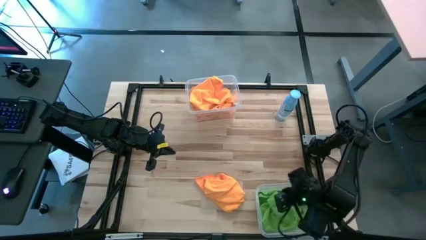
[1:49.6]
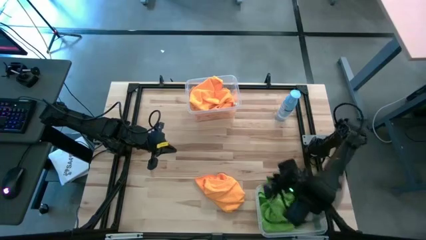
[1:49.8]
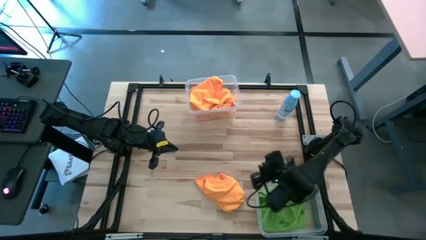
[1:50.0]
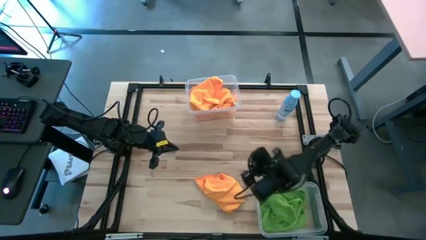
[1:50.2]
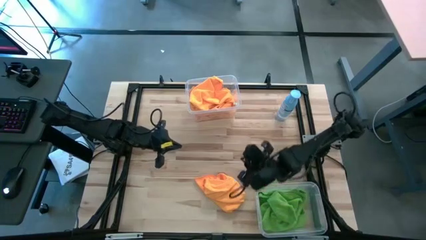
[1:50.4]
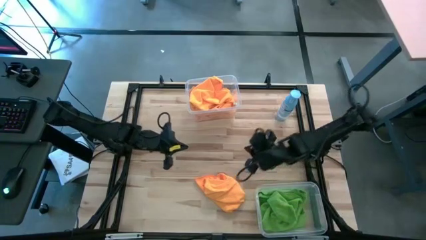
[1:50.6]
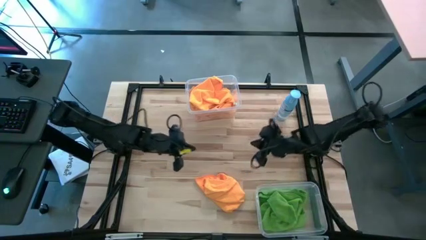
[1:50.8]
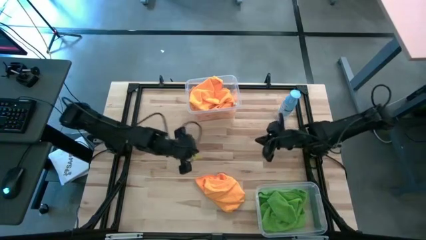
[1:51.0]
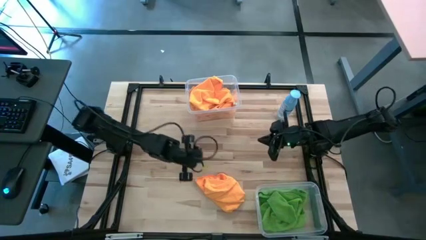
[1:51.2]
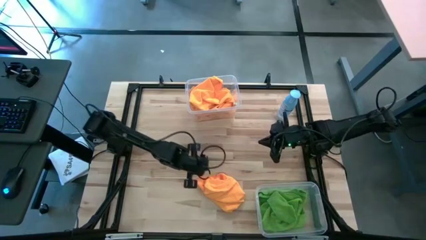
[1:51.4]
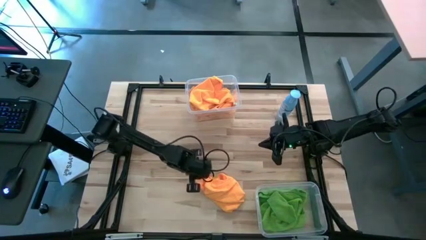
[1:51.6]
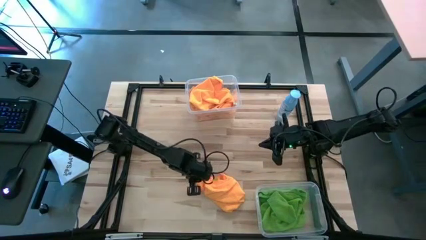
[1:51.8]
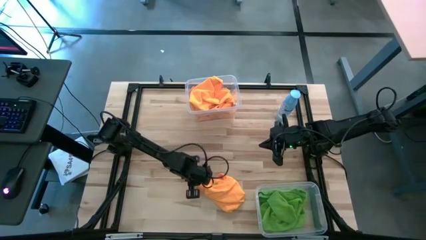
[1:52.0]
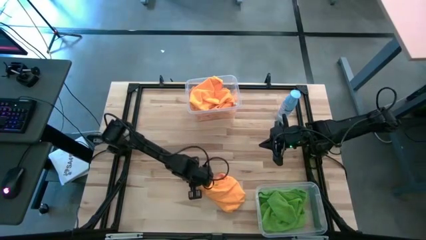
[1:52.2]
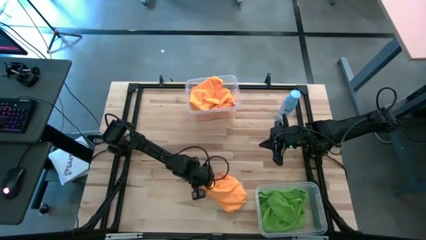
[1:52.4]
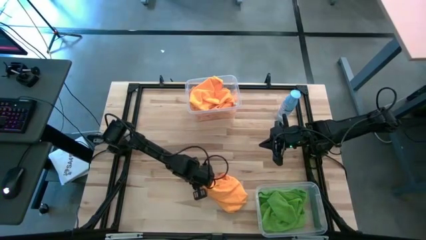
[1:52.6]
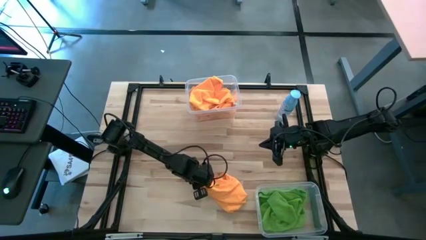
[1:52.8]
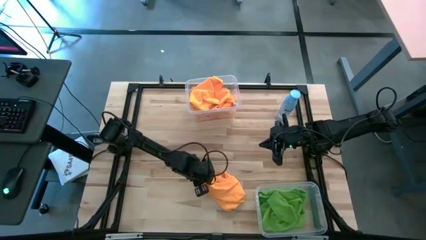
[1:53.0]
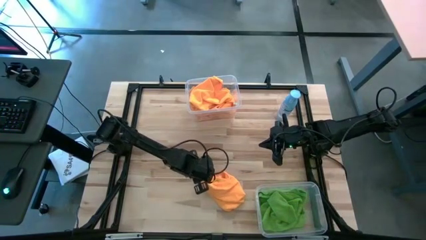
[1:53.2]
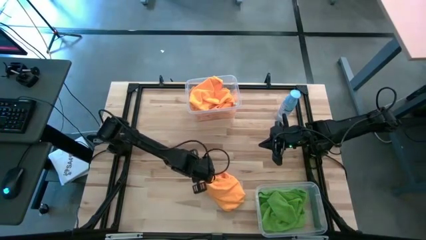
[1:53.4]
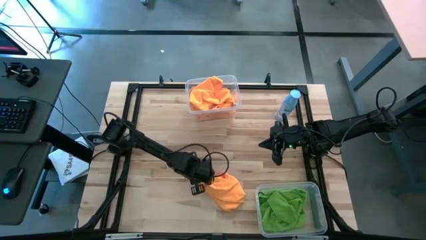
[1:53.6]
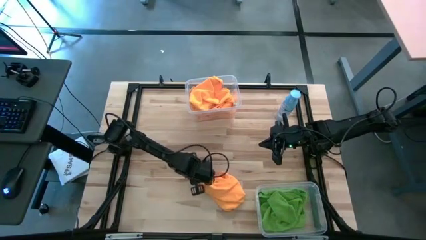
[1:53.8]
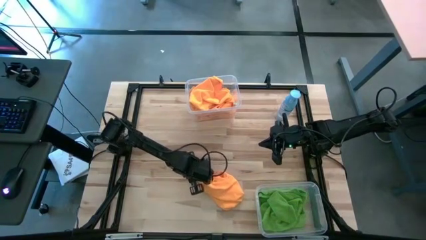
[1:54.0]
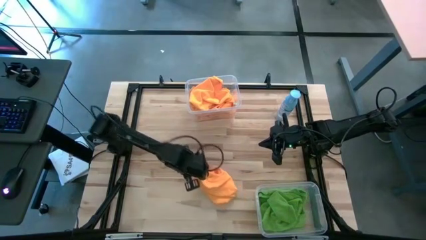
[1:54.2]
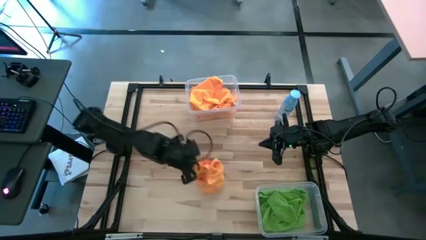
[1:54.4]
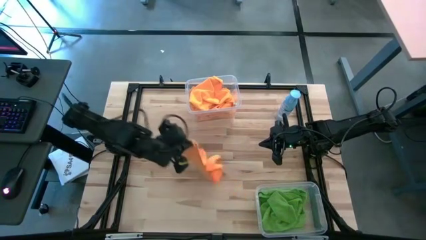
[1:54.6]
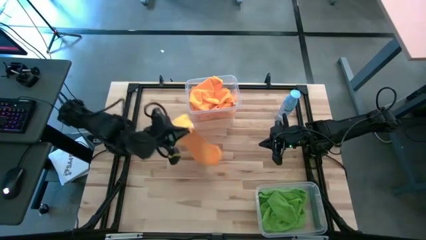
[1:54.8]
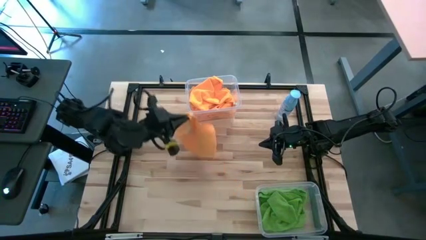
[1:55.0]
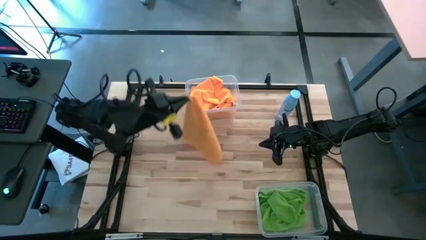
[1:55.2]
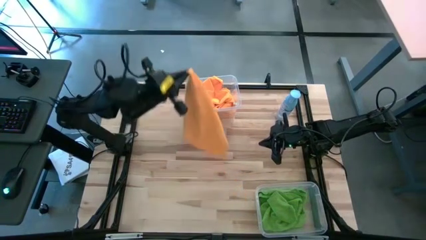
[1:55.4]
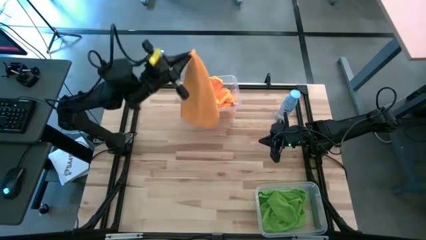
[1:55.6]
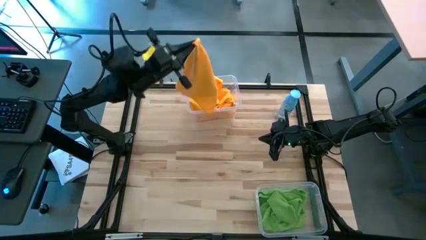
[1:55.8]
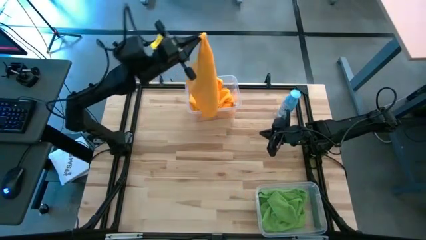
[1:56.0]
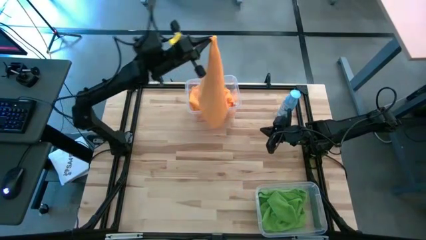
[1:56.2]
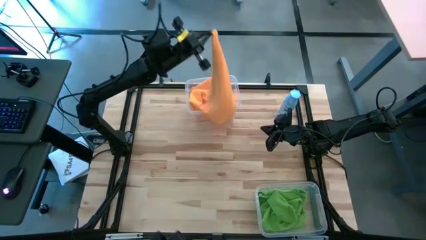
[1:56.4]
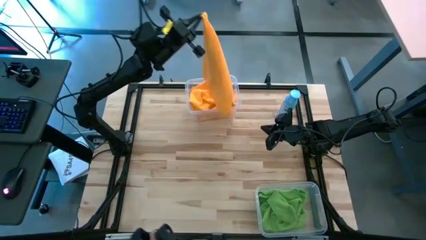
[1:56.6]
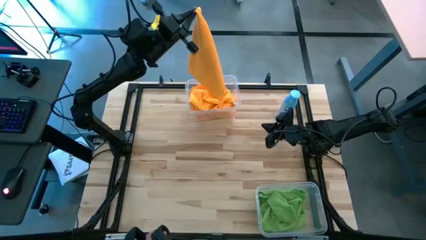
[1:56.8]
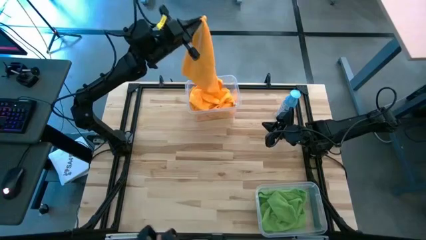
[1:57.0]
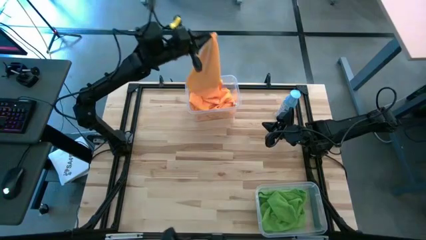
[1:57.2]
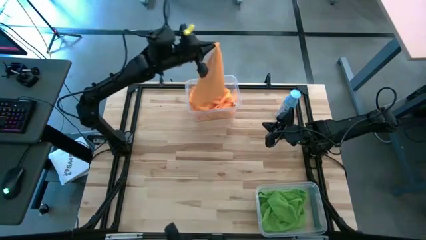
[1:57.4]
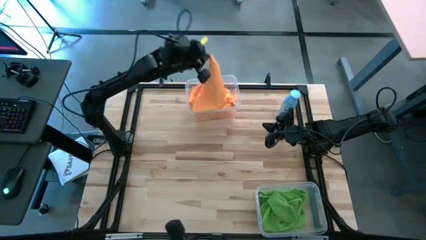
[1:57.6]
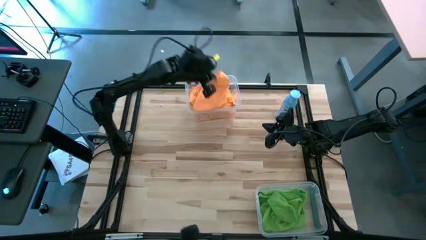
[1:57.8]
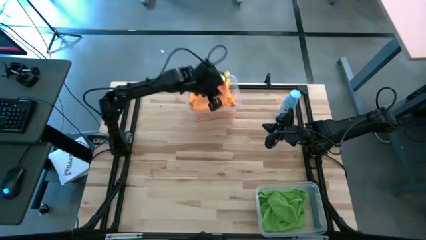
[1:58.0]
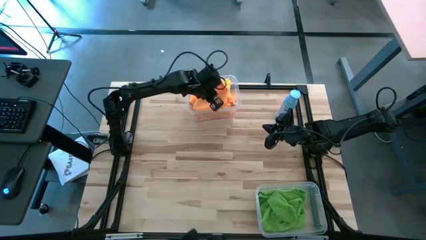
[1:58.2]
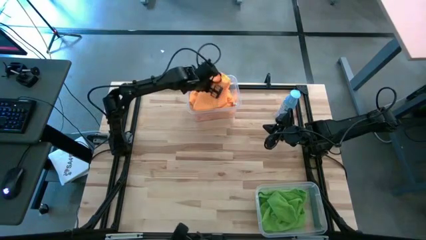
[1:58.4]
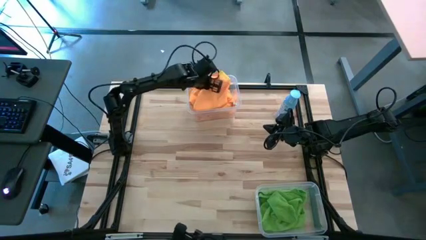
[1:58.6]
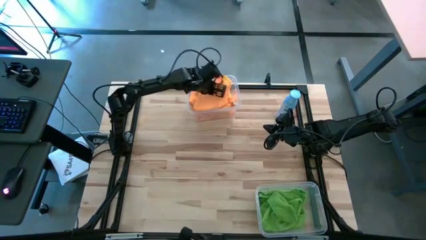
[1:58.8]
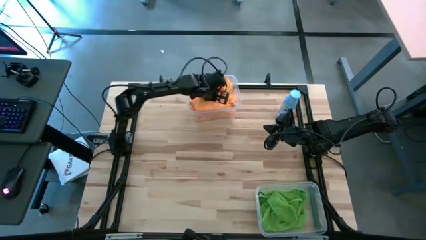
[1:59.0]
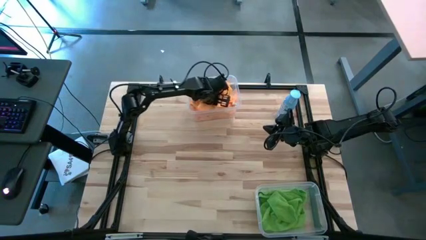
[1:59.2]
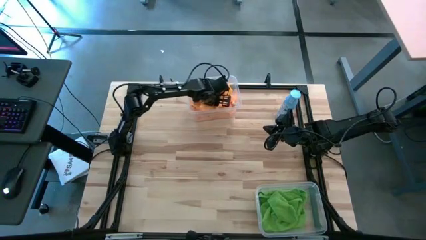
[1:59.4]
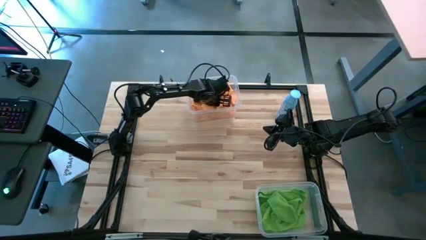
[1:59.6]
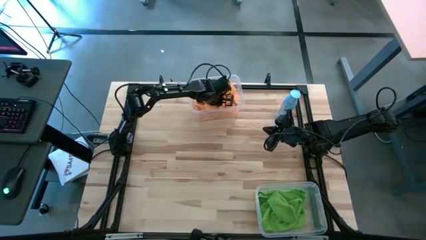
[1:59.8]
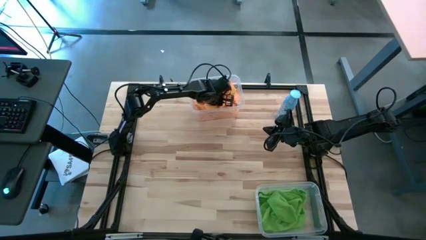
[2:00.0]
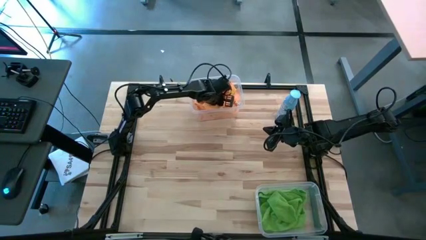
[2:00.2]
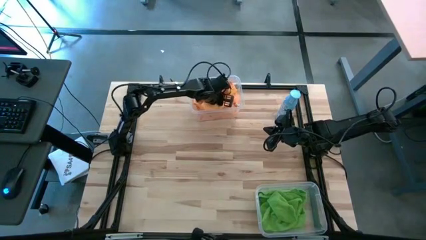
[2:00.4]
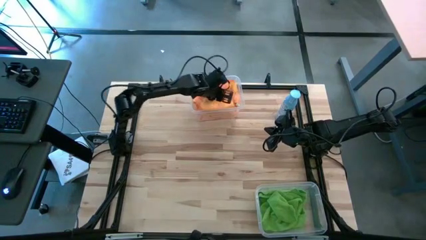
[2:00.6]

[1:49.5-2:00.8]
Task: Sort microfiber towel by color & place in baskets
Put the orange microfiber towel into the top transparent bin

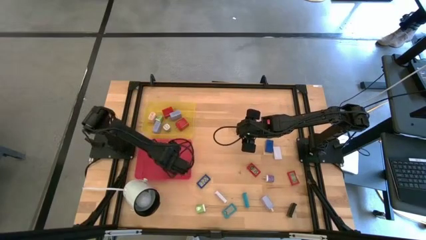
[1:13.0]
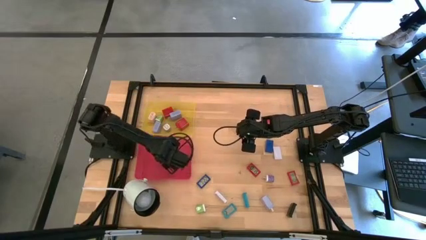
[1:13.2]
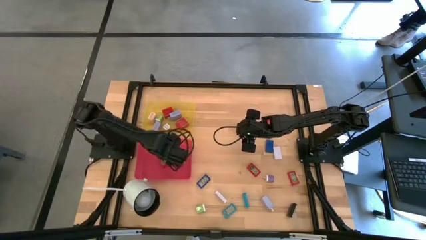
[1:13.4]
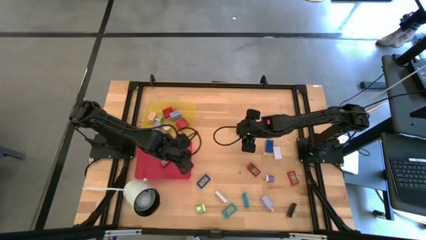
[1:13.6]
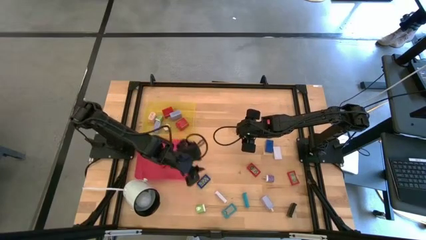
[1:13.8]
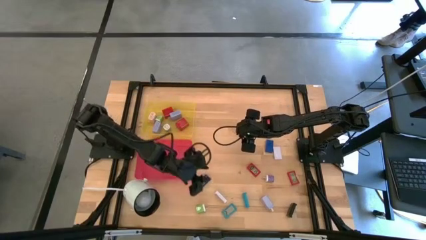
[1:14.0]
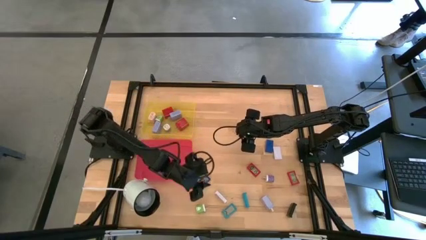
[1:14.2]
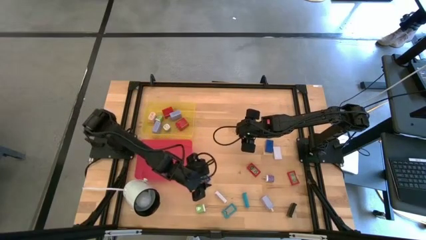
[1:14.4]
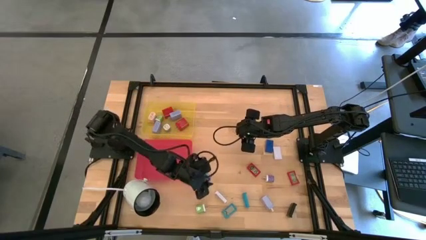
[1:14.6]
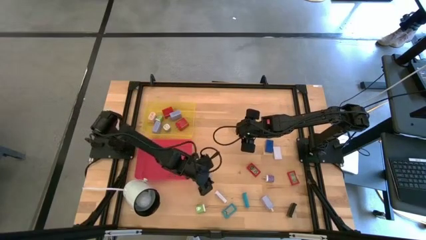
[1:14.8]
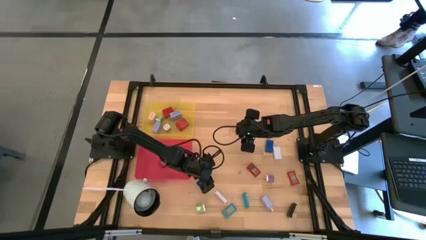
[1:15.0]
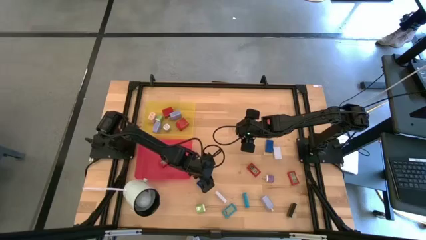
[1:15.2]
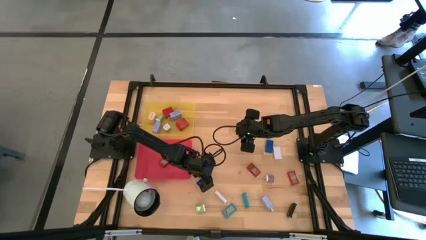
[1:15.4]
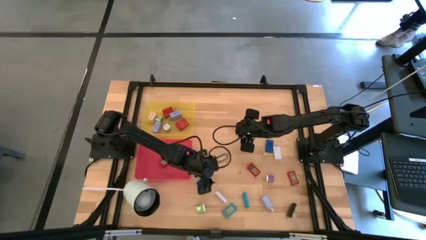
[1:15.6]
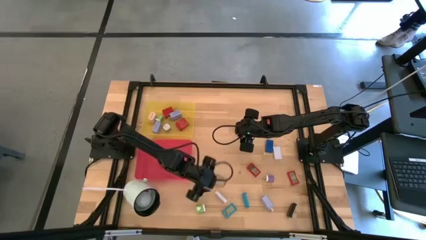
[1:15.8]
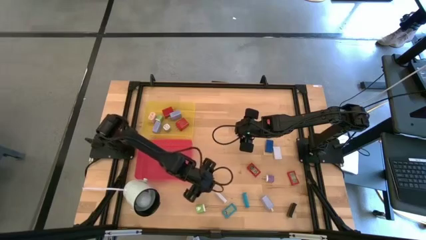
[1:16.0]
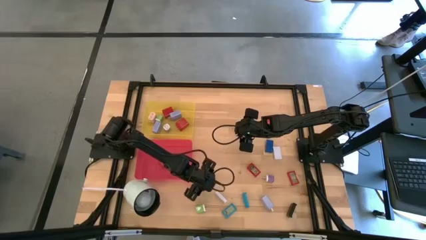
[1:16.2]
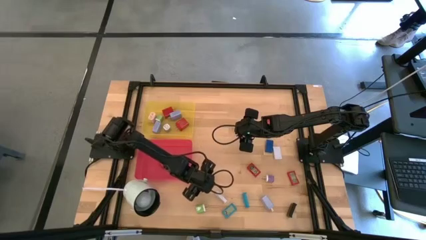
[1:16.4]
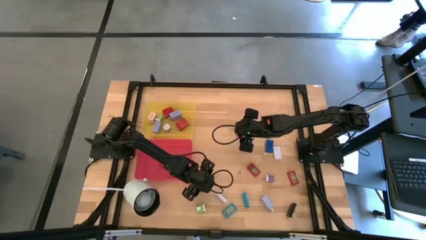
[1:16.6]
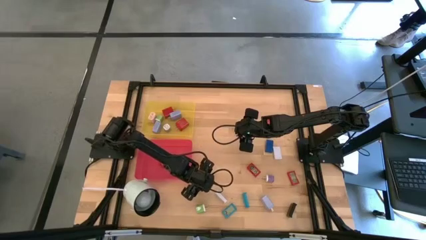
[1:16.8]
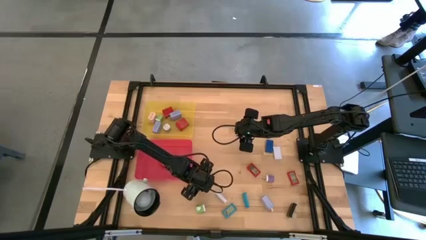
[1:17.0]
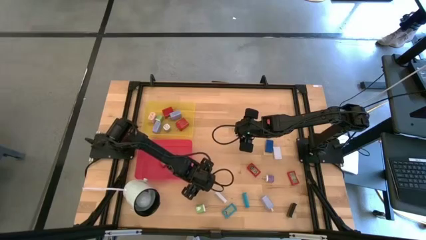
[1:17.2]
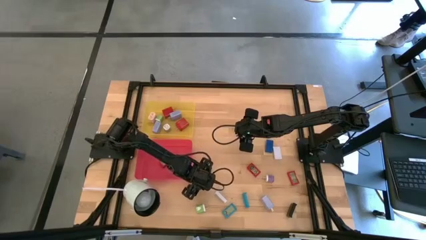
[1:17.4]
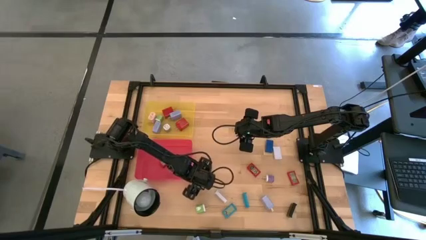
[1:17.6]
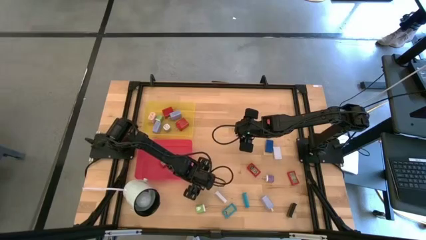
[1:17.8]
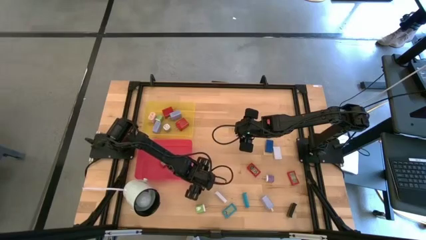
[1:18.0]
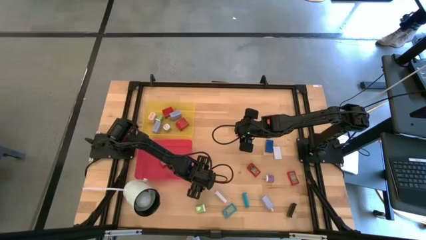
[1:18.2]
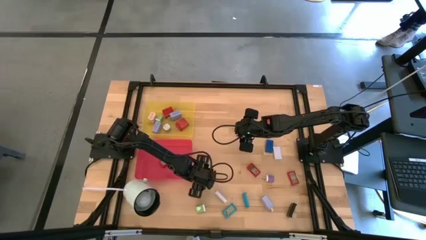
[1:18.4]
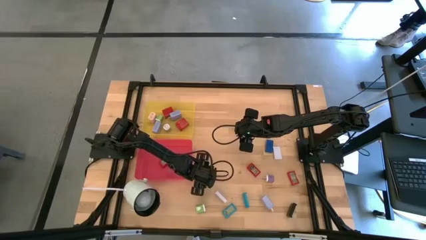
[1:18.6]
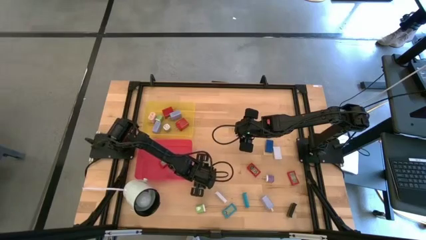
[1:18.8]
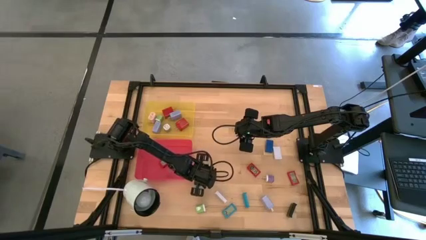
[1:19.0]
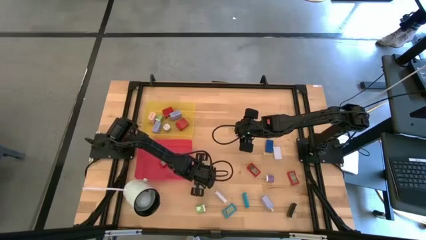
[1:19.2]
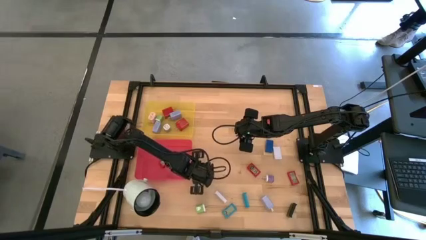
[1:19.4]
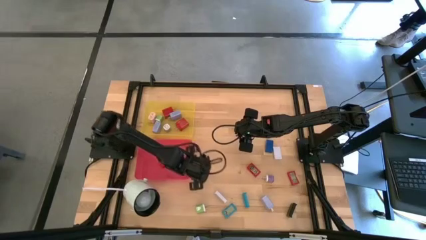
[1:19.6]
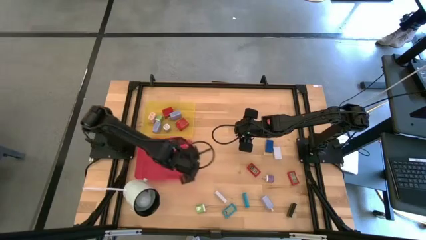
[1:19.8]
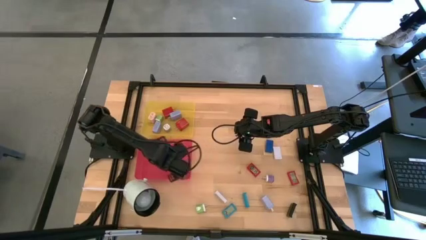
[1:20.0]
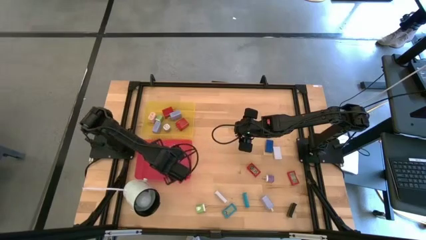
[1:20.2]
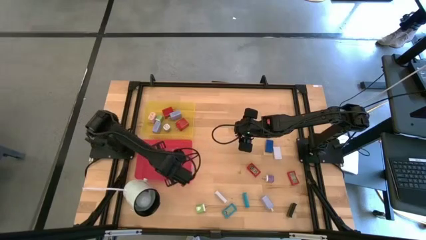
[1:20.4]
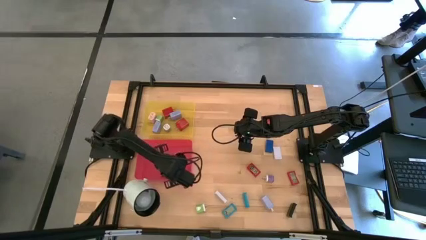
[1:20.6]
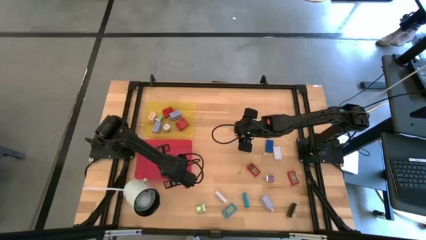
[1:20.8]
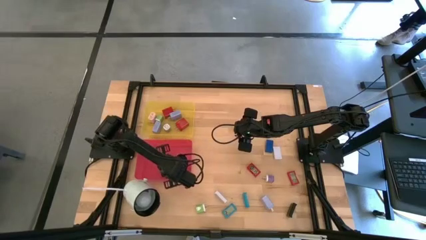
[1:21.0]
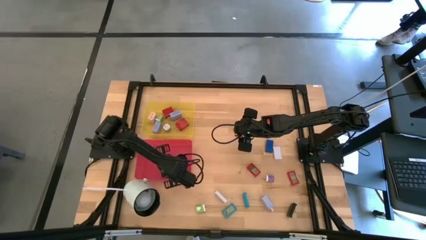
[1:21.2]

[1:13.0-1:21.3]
Task: Pick & Place Office items
Put the blue timer into the red bin
